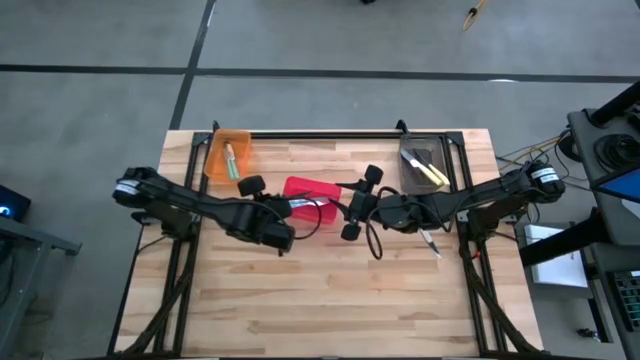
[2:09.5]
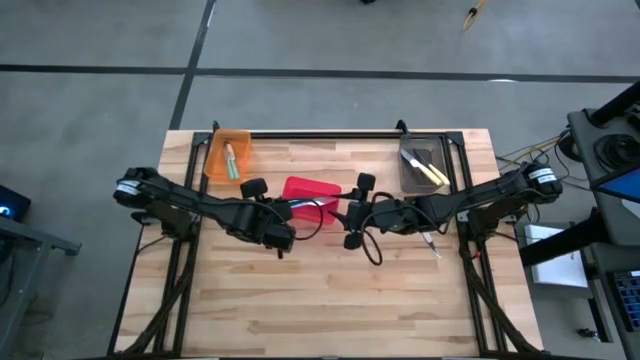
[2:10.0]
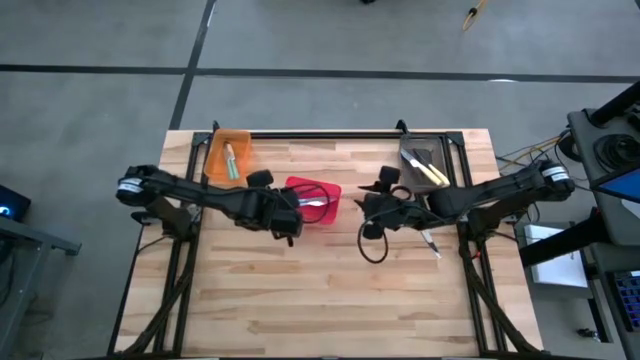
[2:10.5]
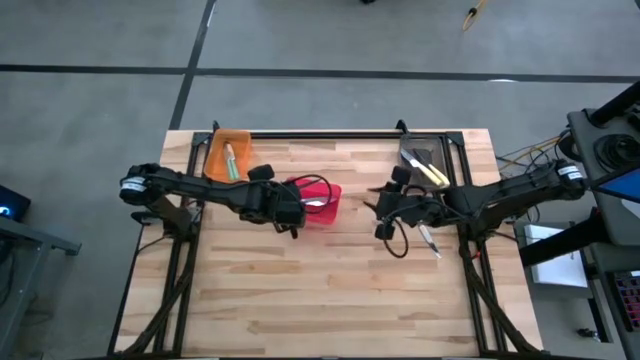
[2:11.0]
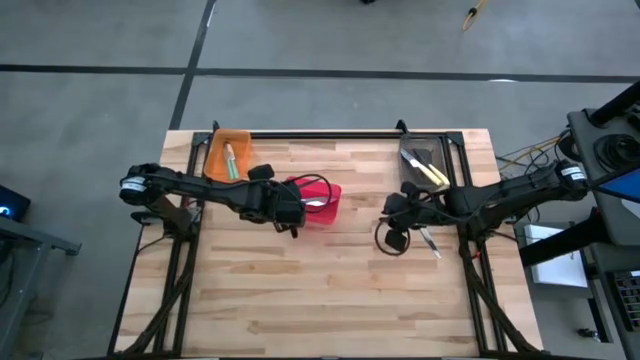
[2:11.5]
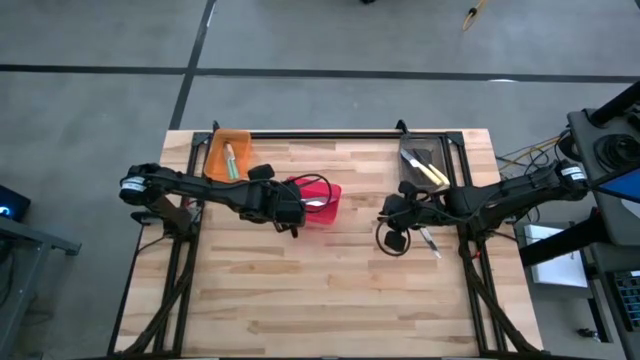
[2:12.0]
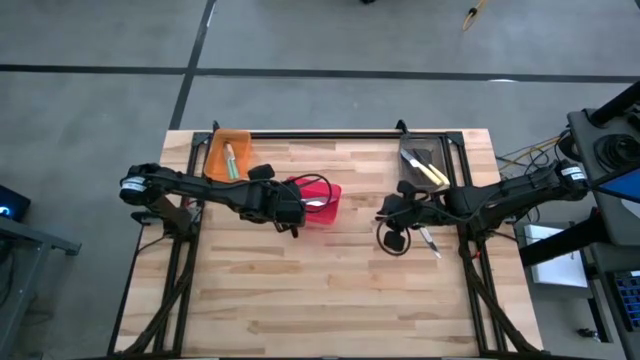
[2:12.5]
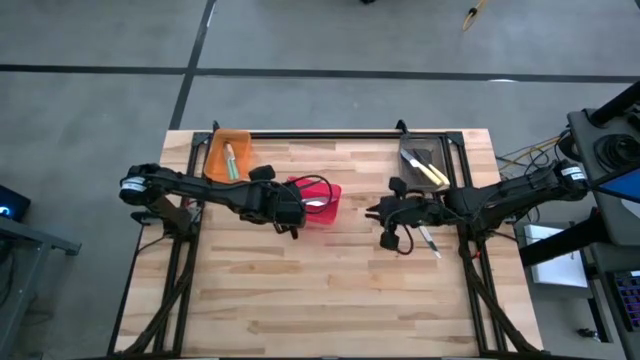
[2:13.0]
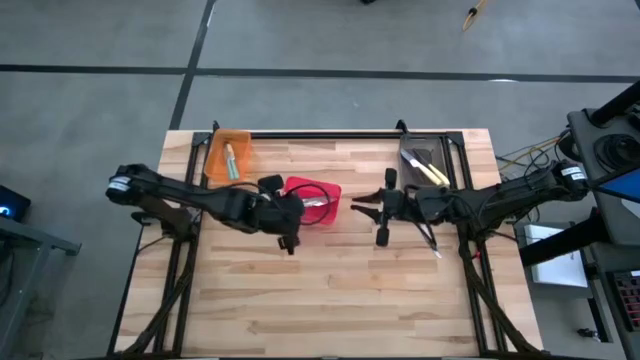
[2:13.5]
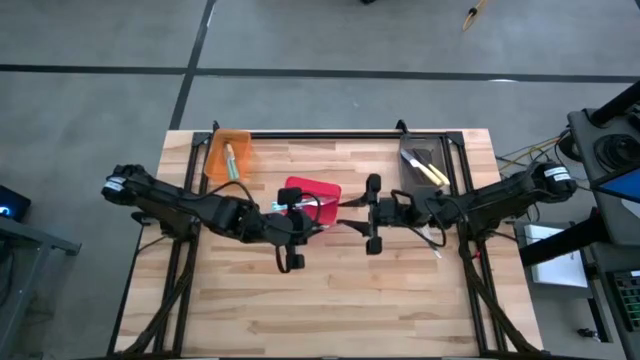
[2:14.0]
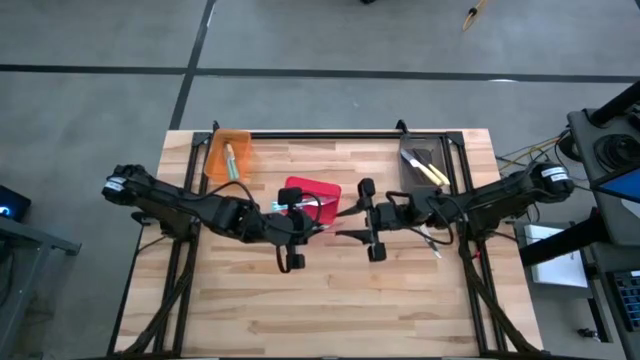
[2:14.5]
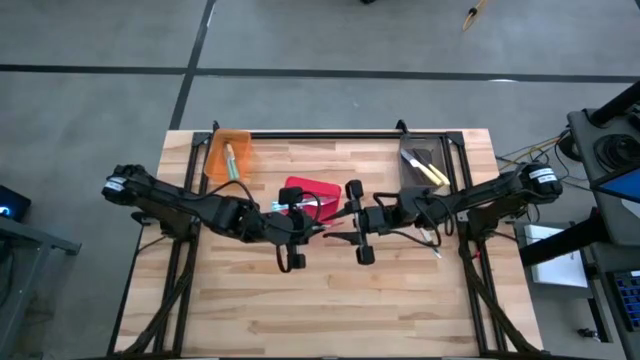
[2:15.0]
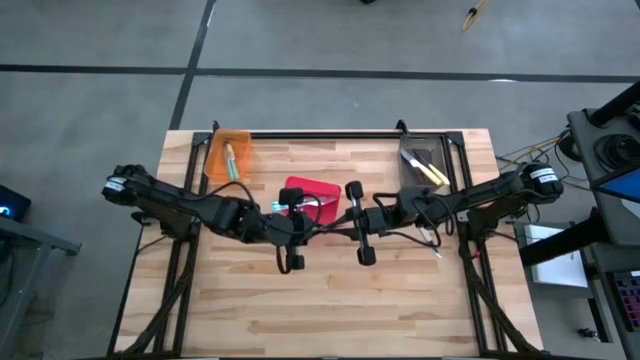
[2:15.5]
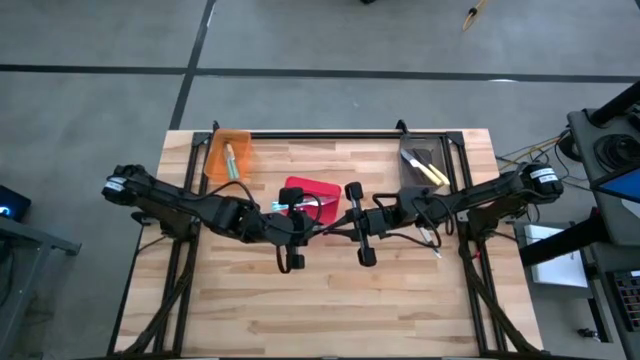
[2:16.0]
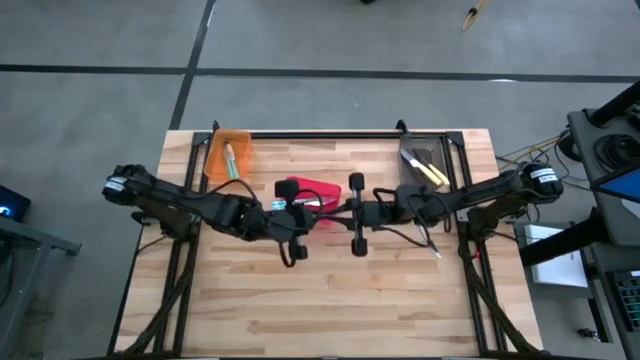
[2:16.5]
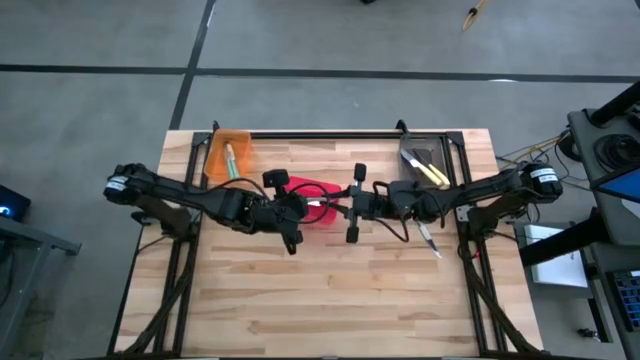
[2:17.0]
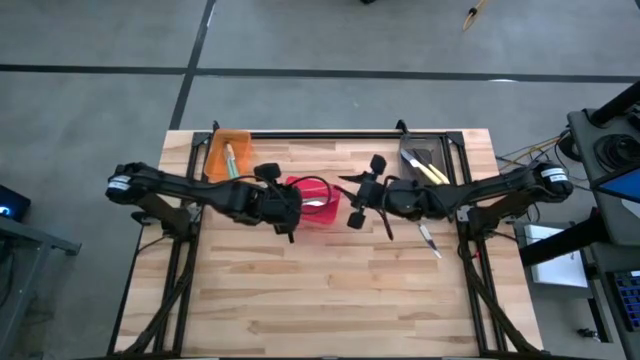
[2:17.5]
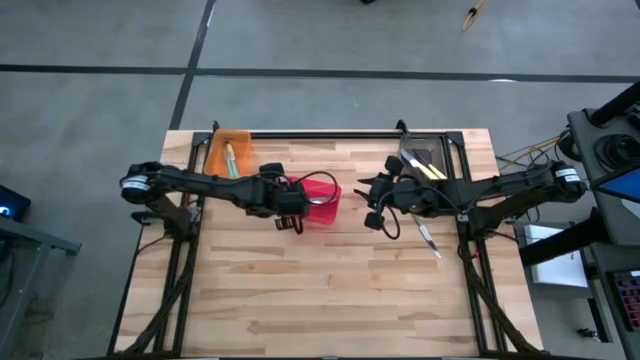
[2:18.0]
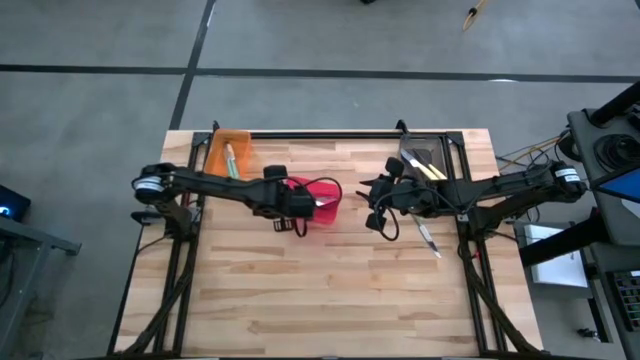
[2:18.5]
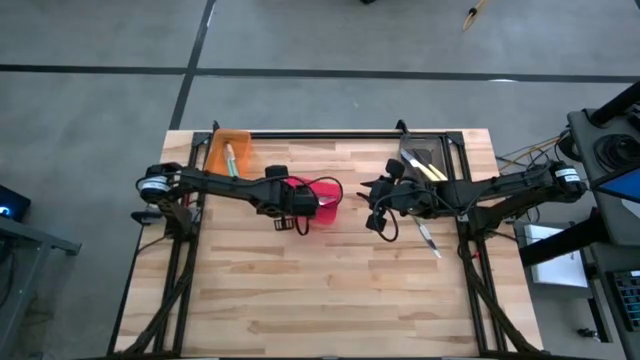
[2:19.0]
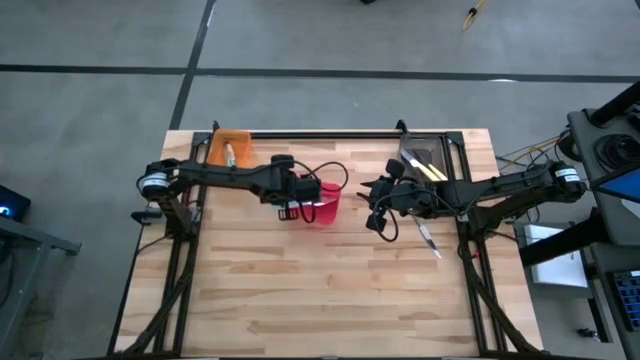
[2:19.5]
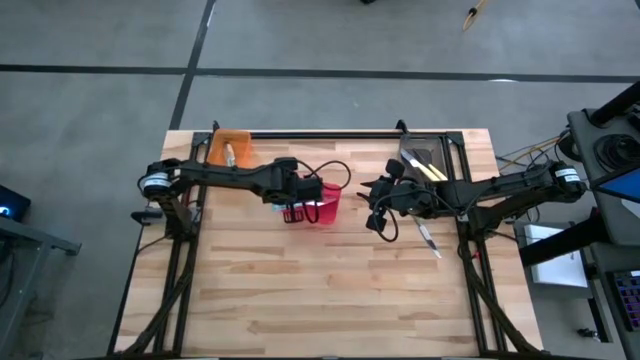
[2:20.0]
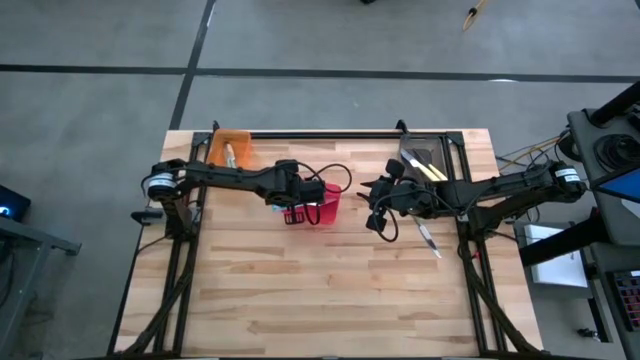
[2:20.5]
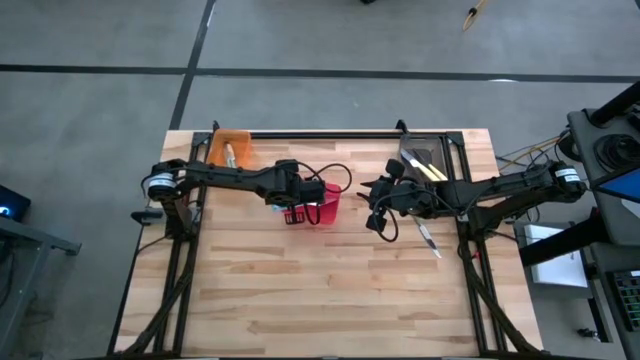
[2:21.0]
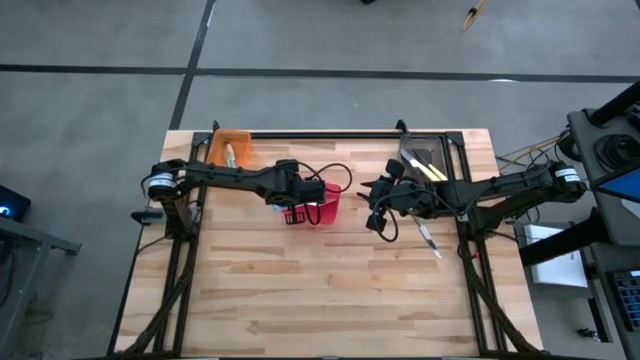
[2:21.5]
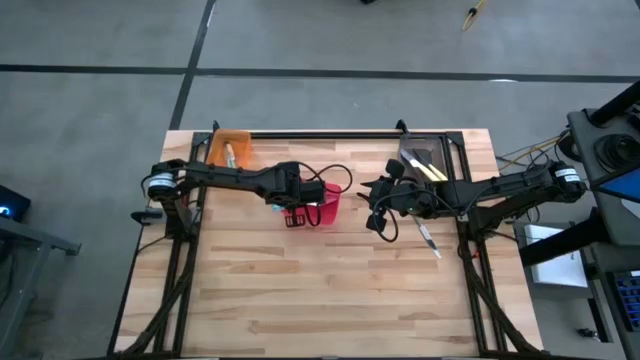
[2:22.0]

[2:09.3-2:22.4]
Task: Sort silverware by color (type)
Put the white patterned table knife into the red bin

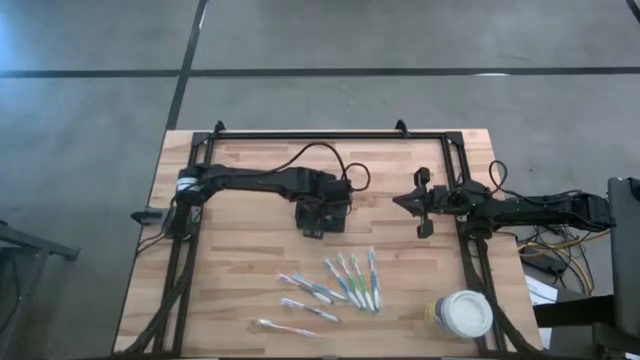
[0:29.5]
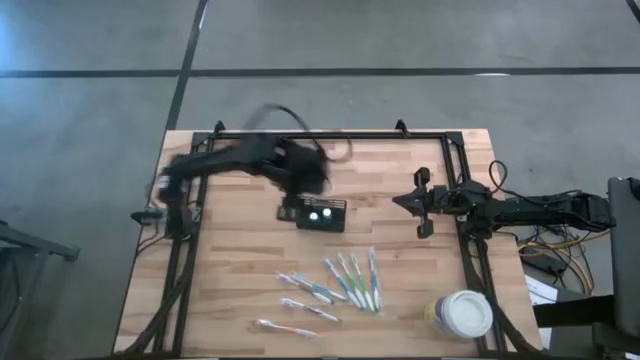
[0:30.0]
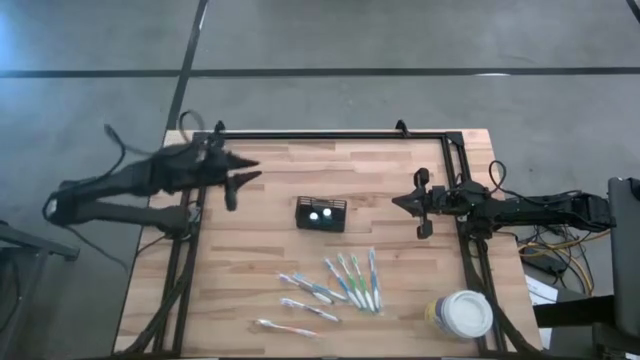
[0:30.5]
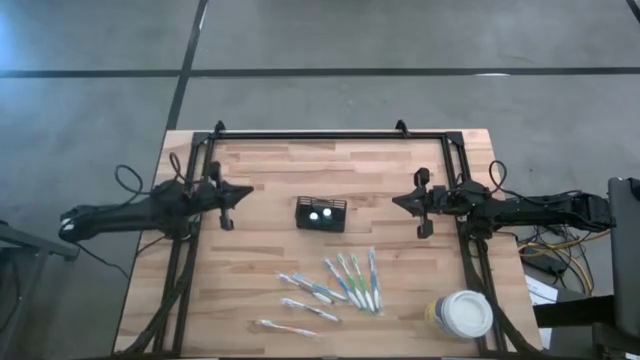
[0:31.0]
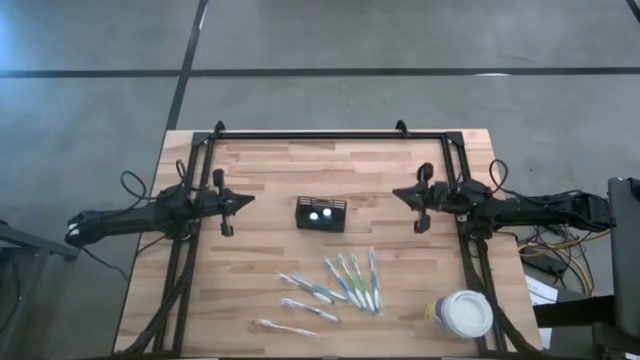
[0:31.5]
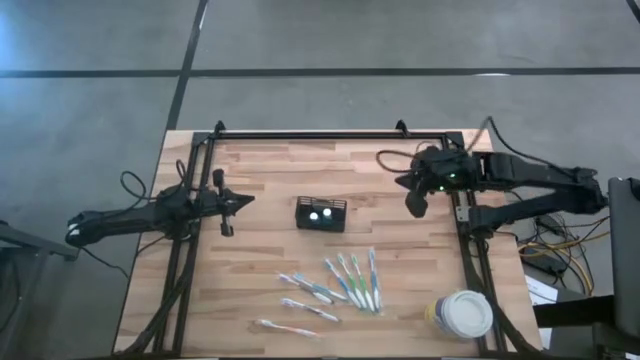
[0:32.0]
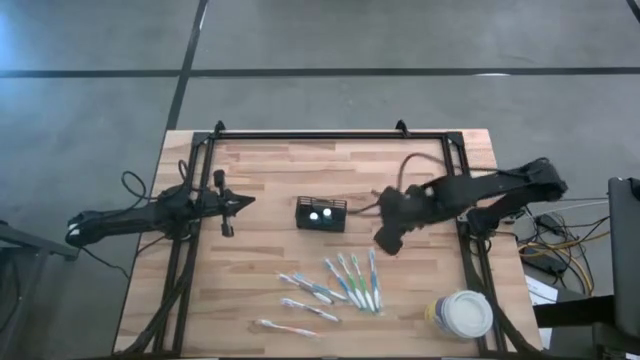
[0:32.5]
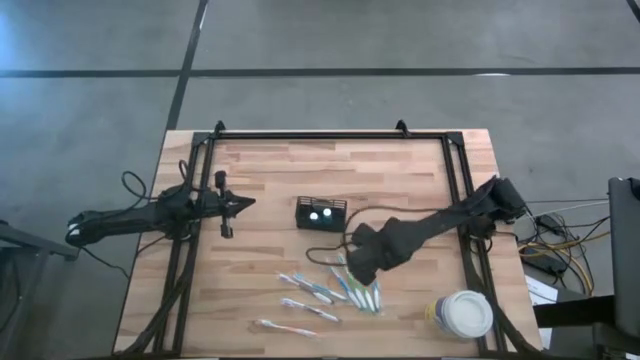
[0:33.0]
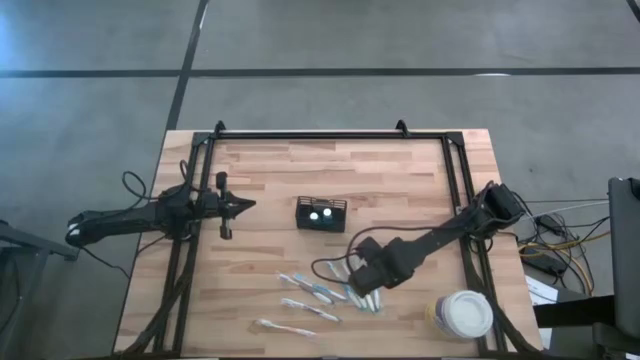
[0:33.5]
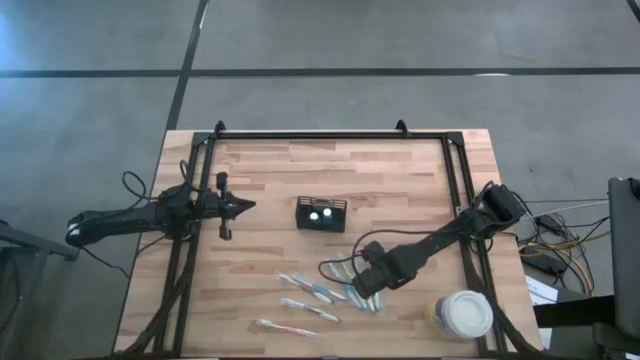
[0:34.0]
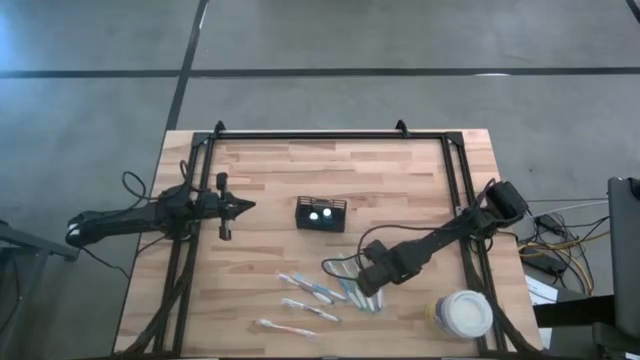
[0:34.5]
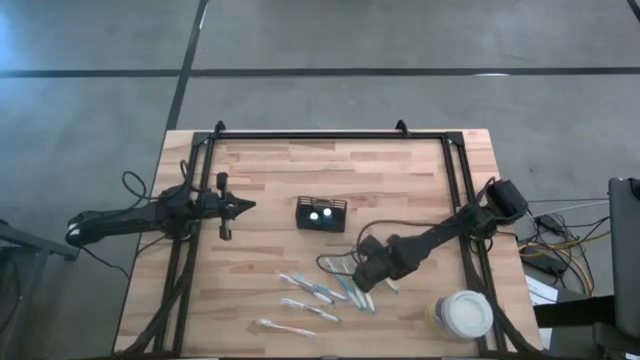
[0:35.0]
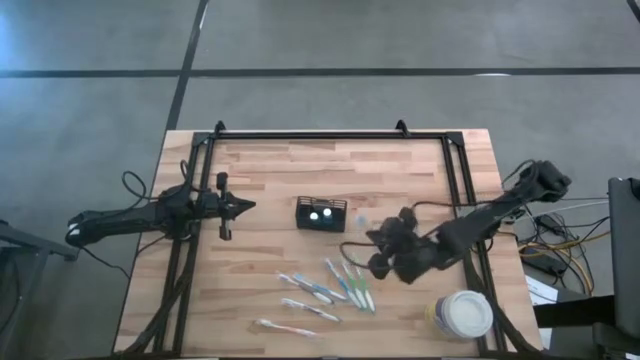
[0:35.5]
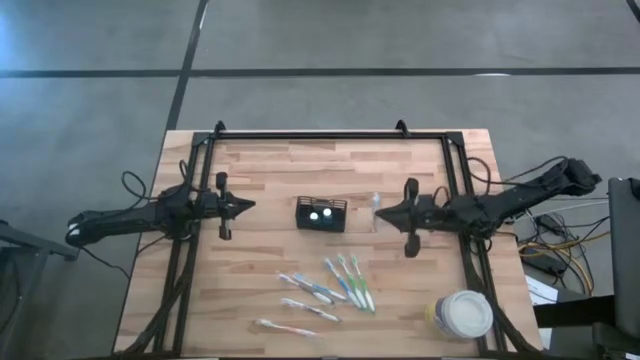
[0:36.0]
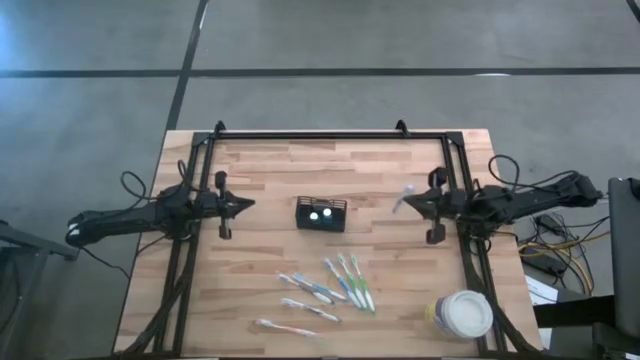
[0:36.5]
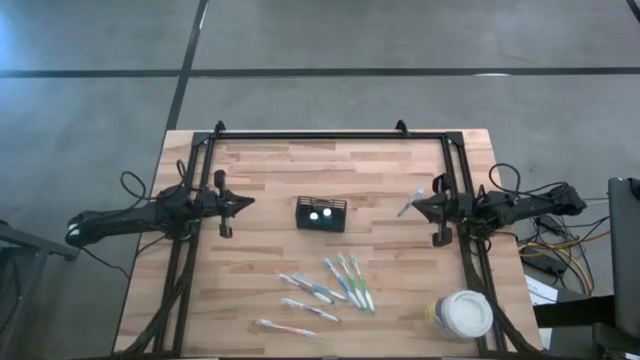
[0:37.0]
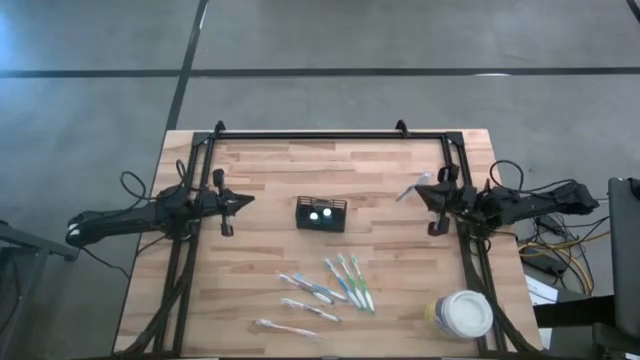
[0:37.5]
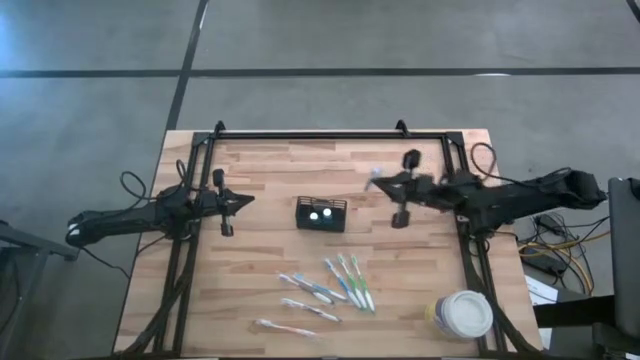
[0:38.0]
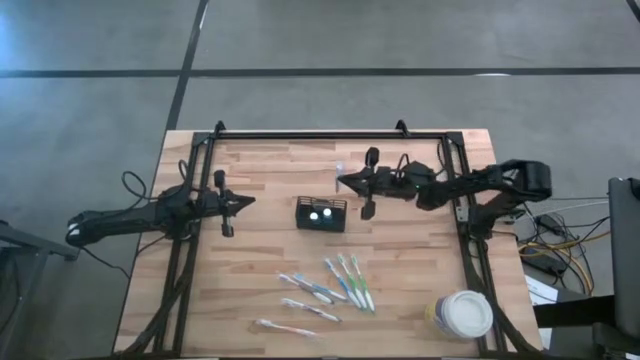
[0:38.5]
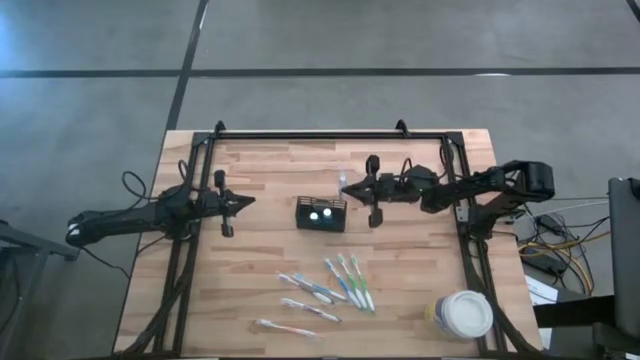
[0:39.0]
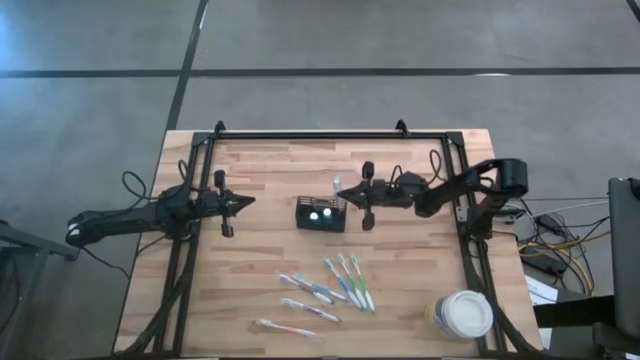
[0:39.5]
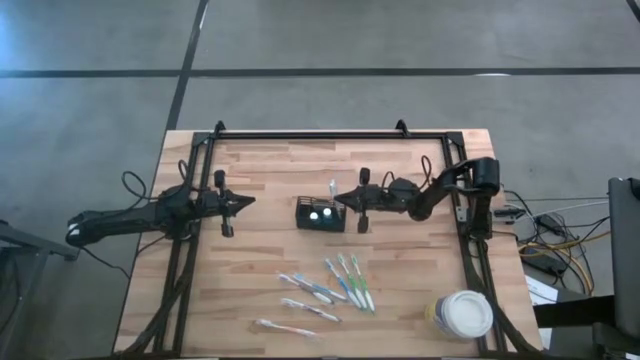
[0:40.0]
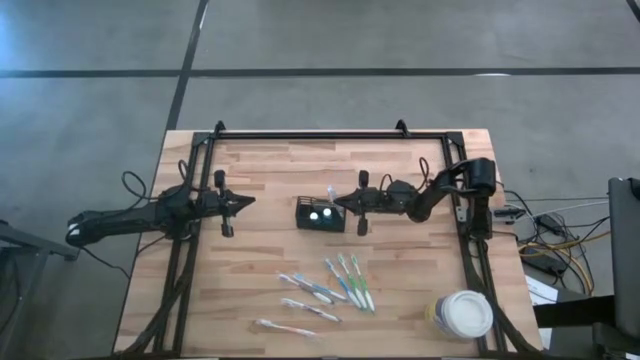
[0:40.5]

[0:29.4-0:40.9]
Task: Pick & Place toothbrushing station
Put the right blue toothbrush into the wire organizer
